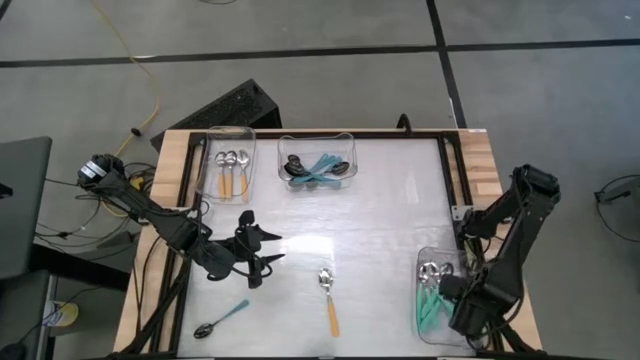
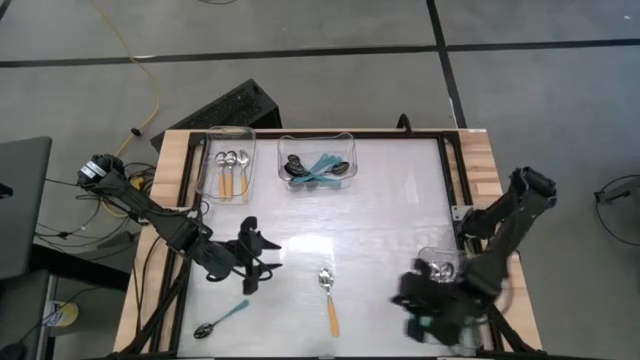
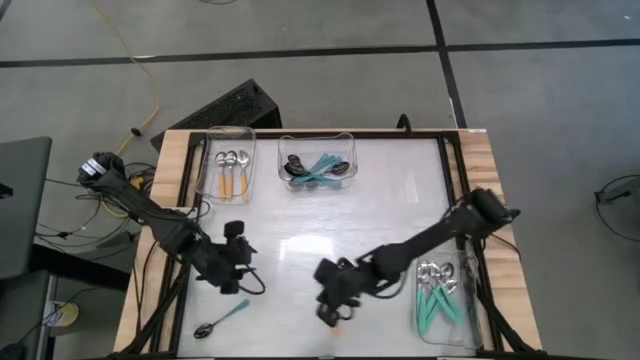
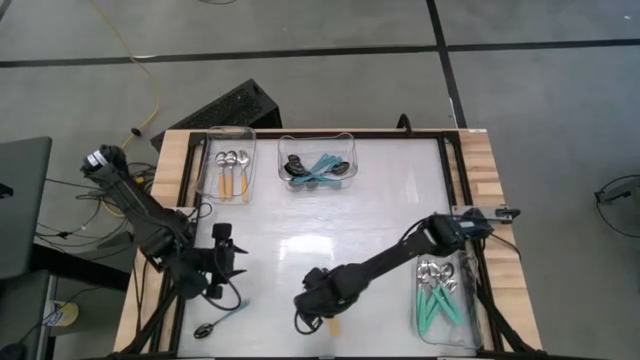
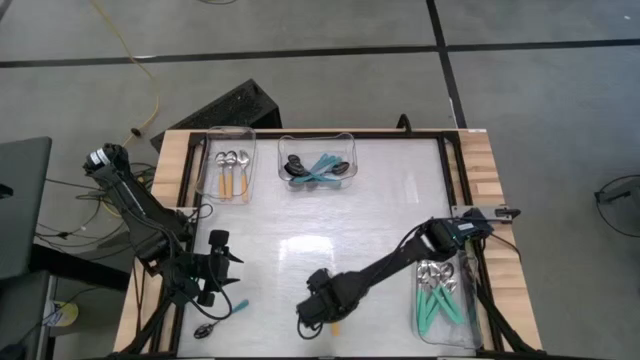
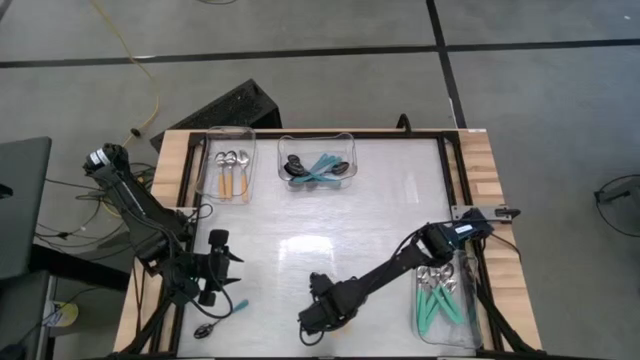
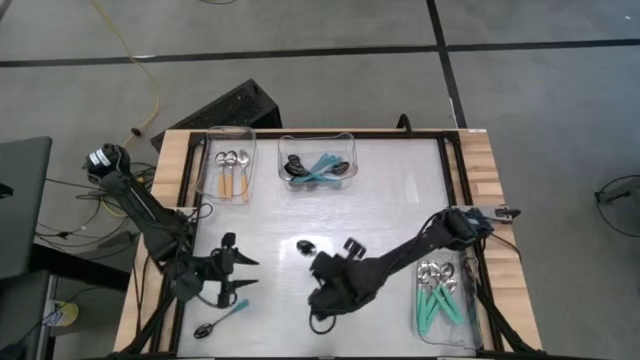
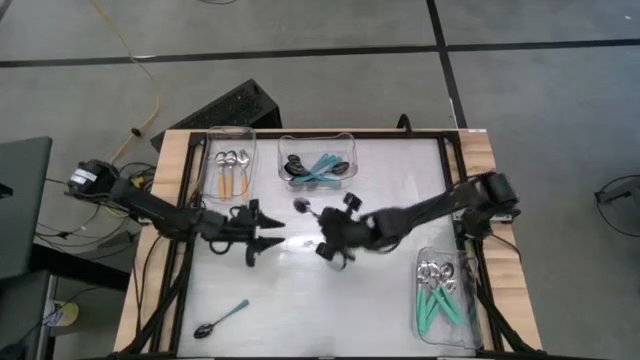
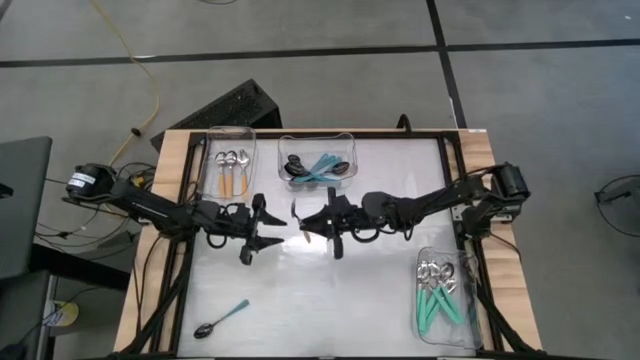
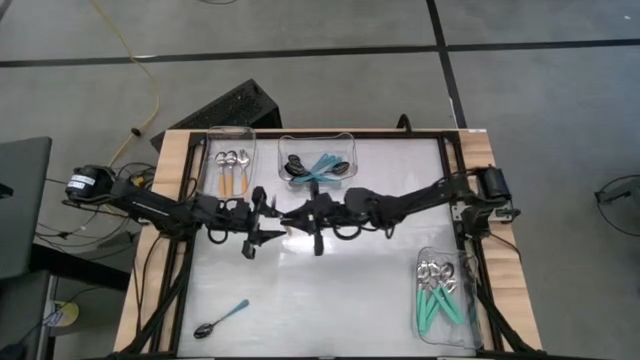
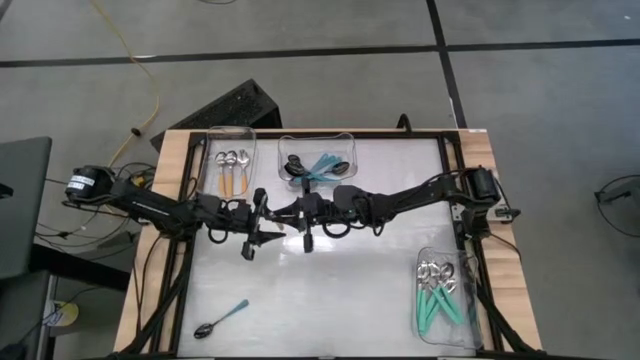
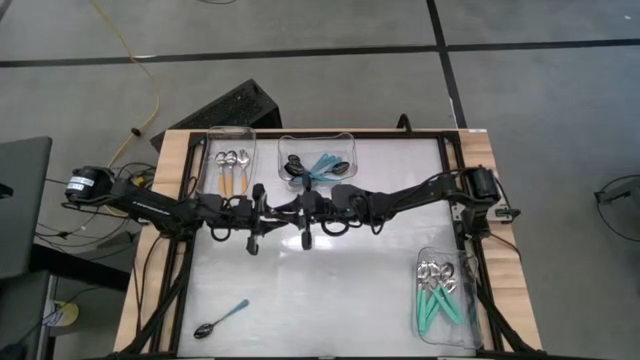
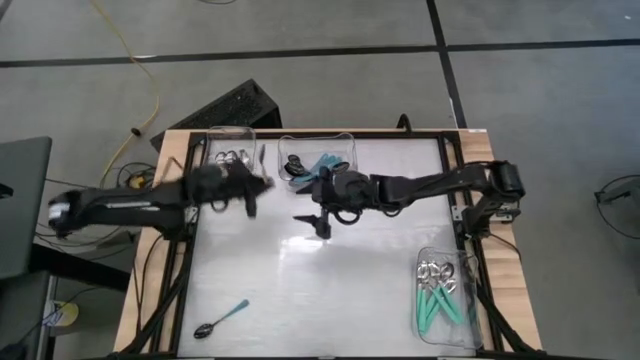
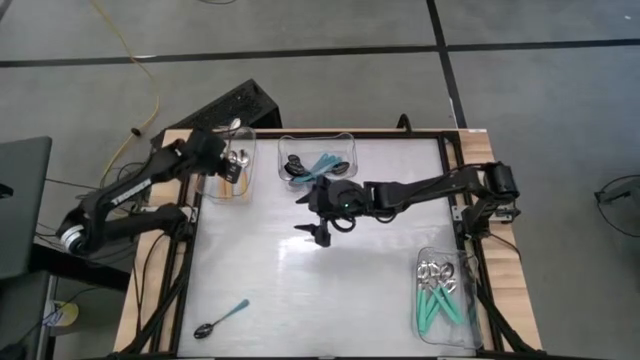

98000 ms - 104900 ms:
Task: Sort silverware by color (type)
Put the yellow spoon into the top left transparent bin

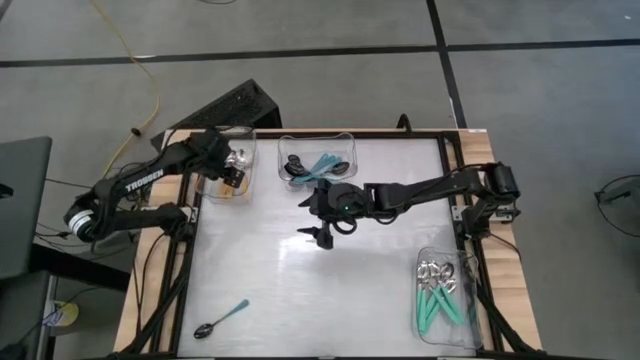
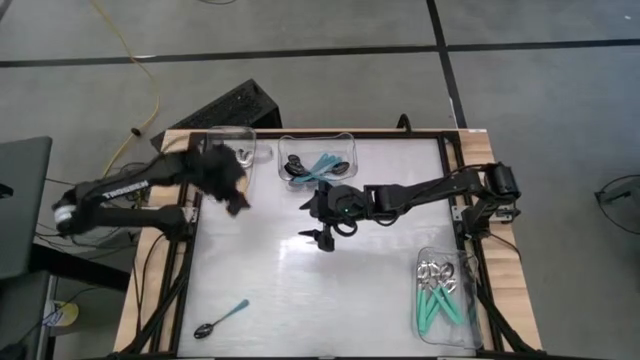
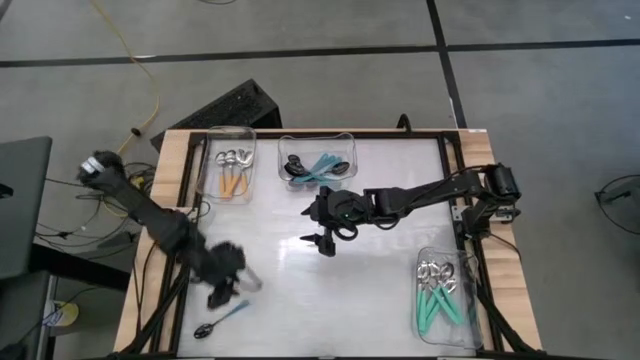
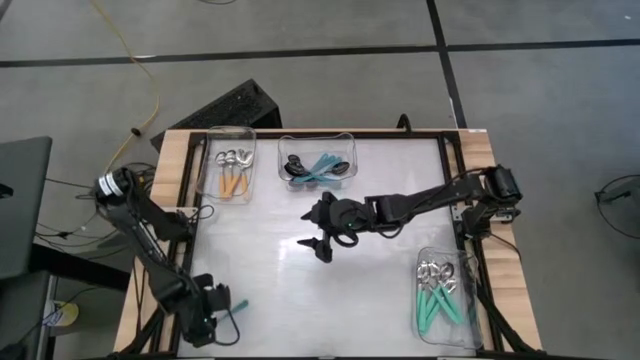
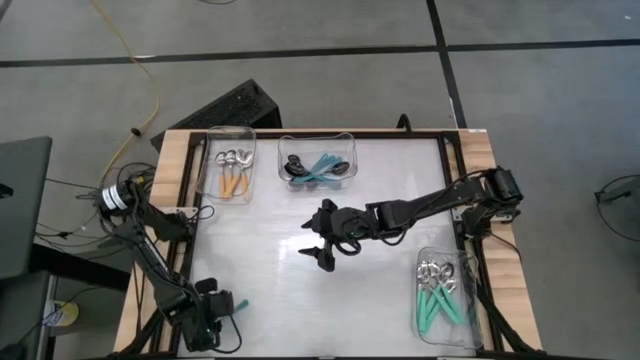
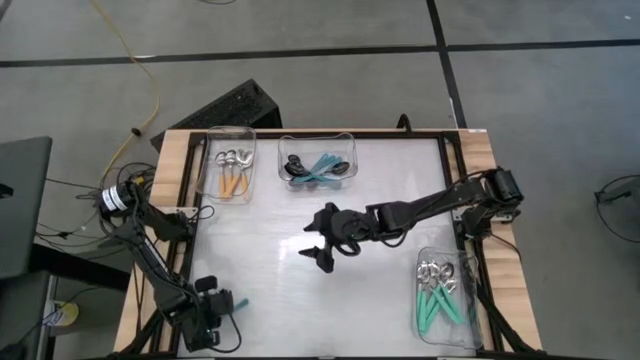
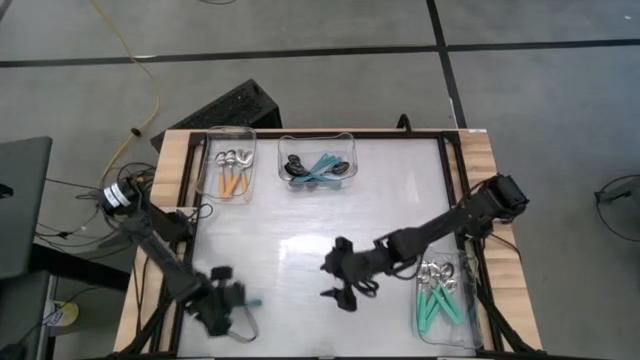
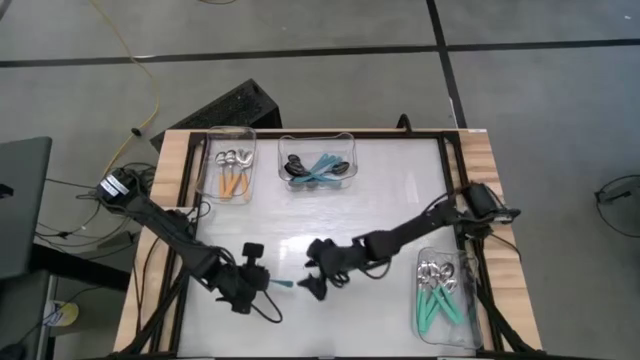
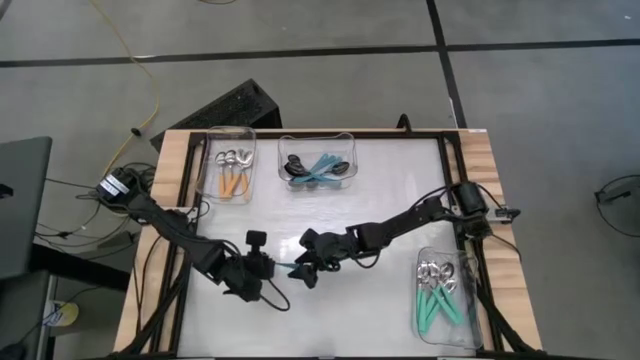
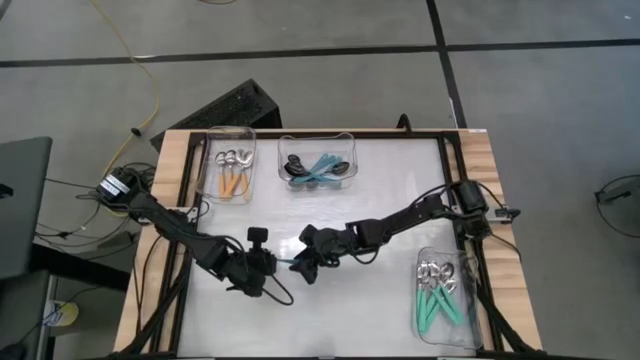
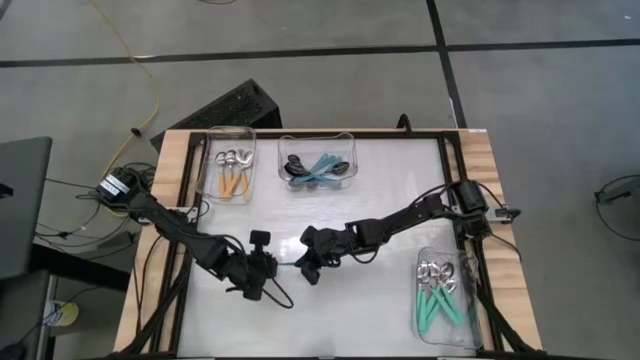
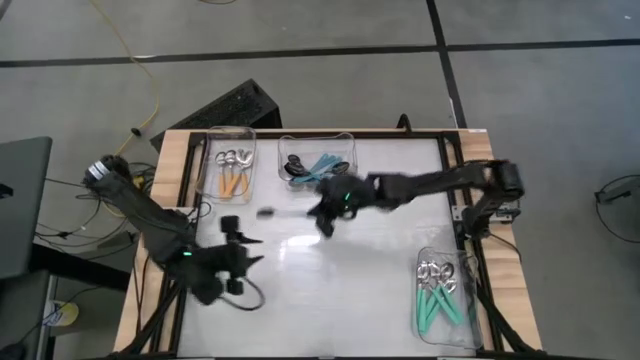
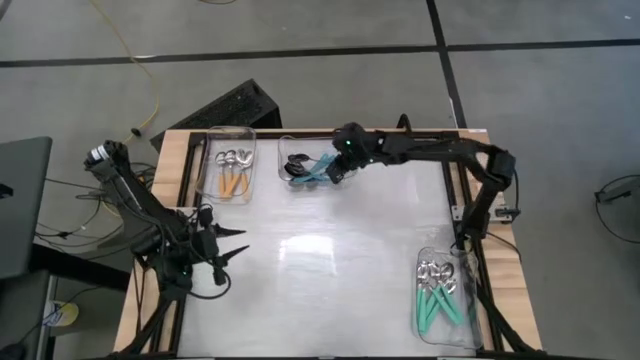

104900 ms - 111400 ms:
Put the blue spoon into the top middle transparent bin

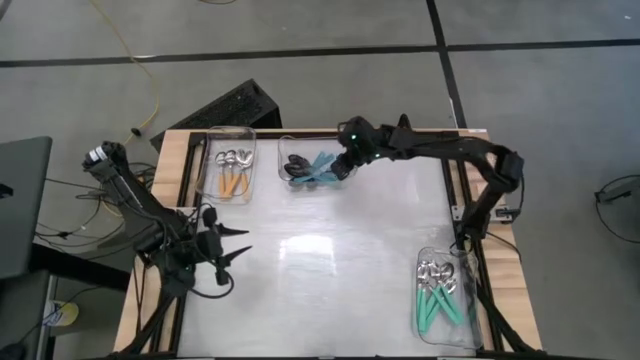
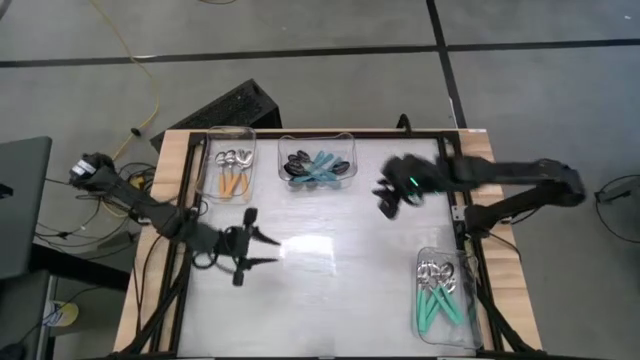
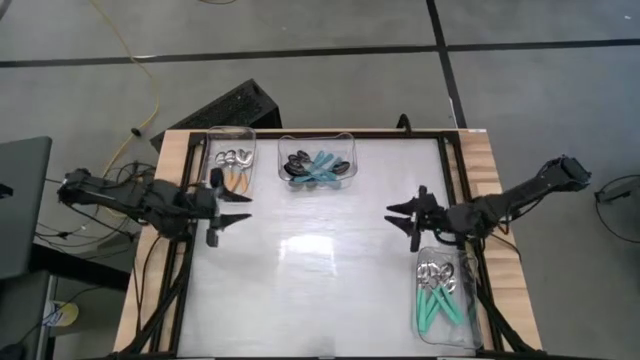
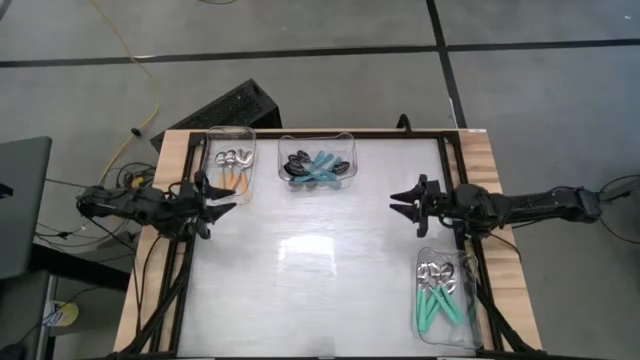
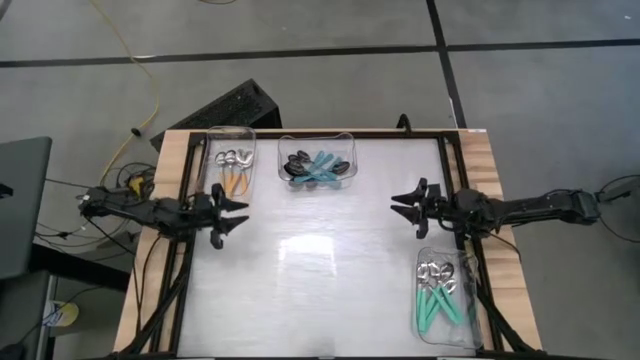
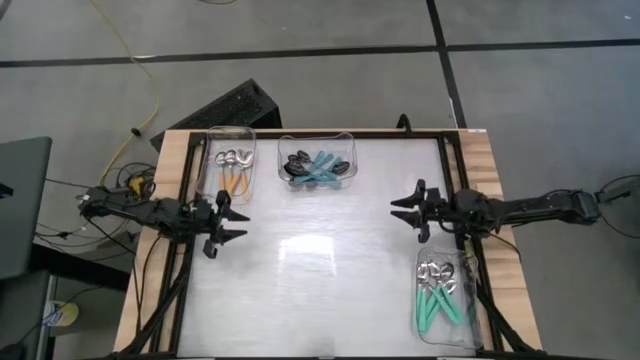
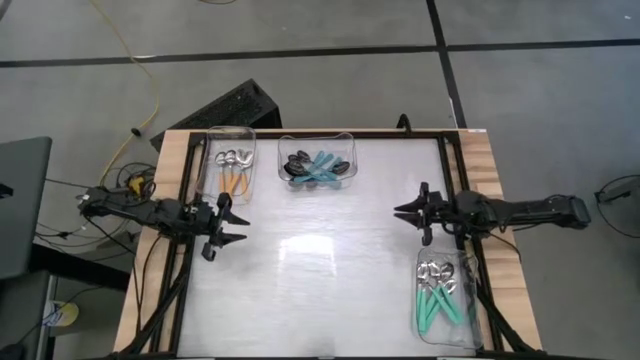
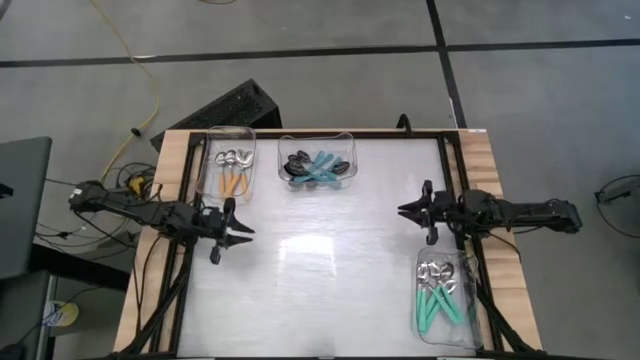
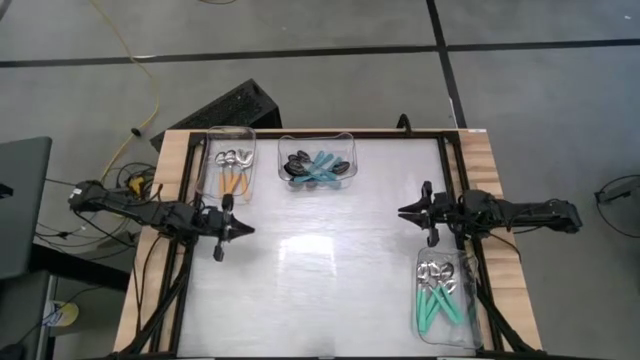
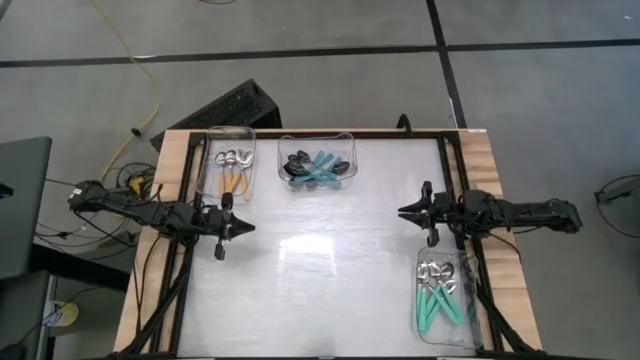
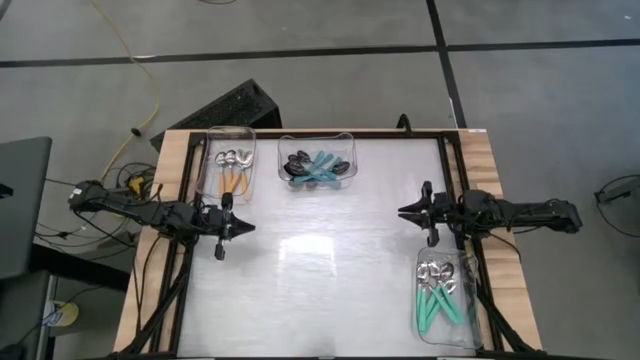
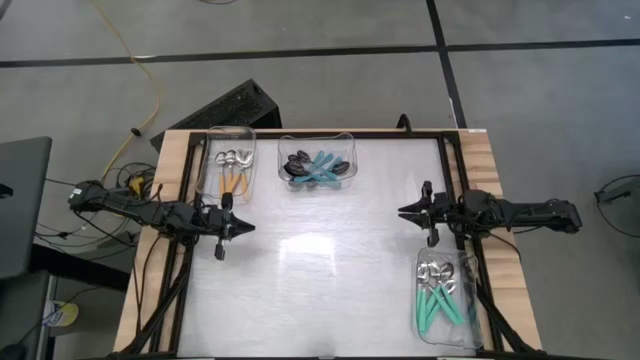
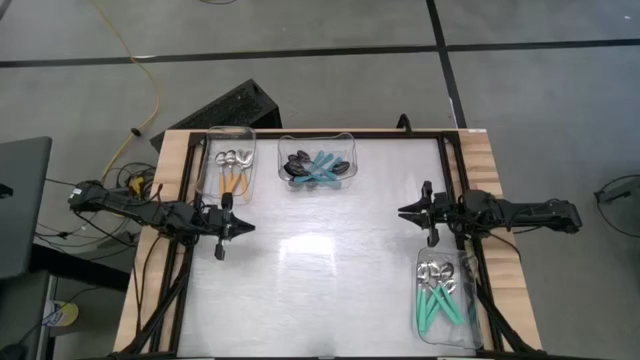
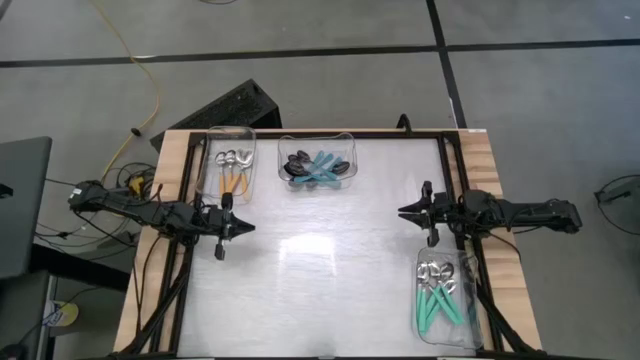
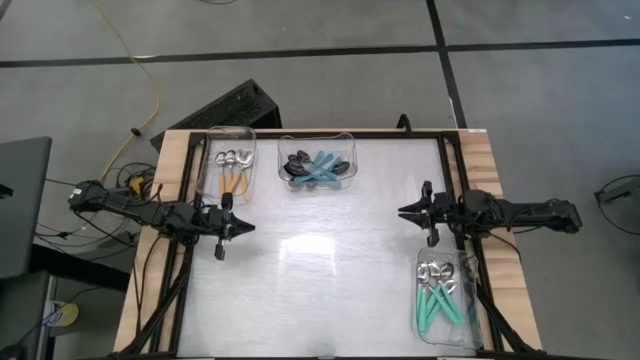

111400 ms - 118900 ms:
Return to Home Position
